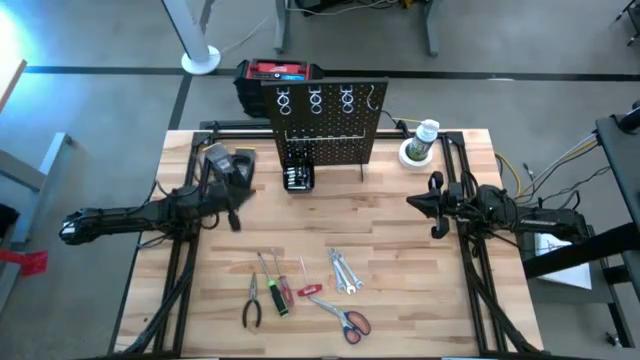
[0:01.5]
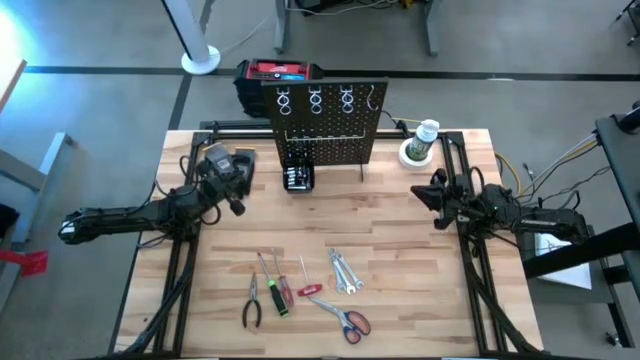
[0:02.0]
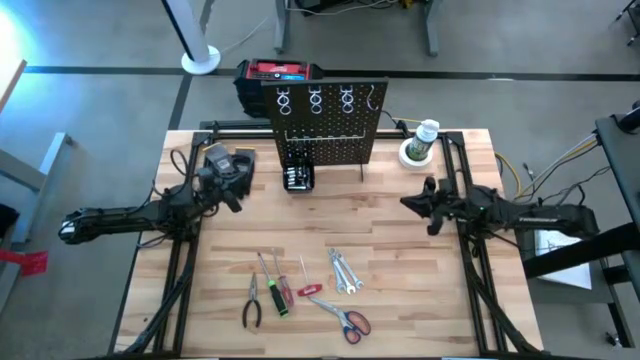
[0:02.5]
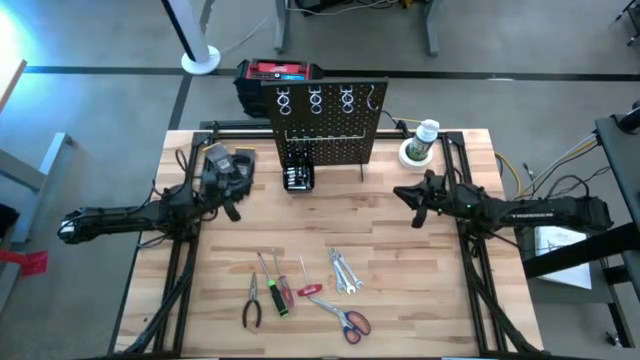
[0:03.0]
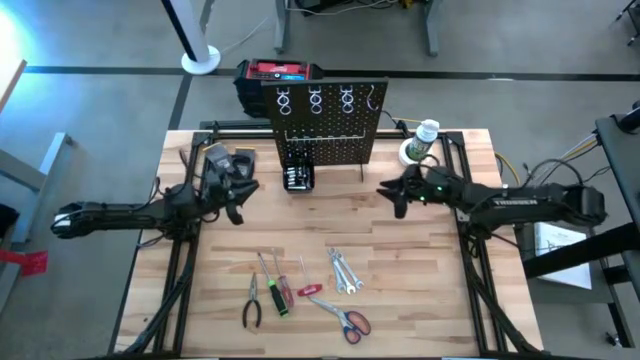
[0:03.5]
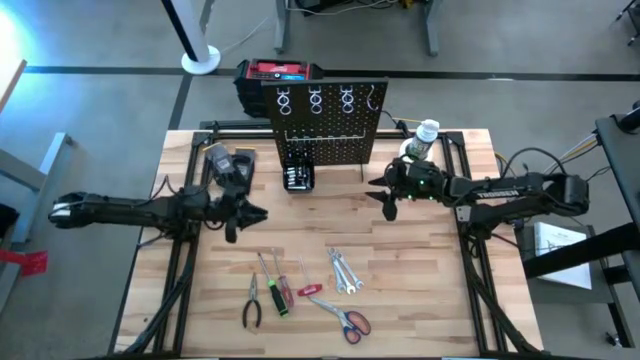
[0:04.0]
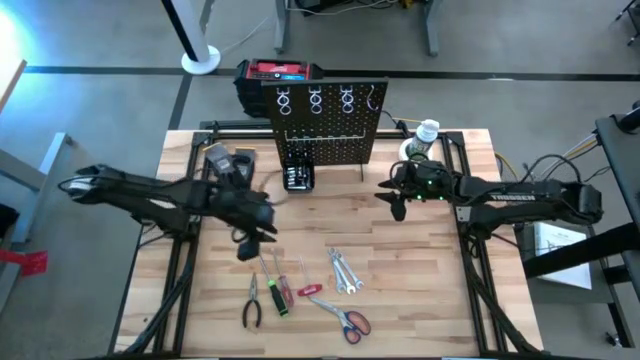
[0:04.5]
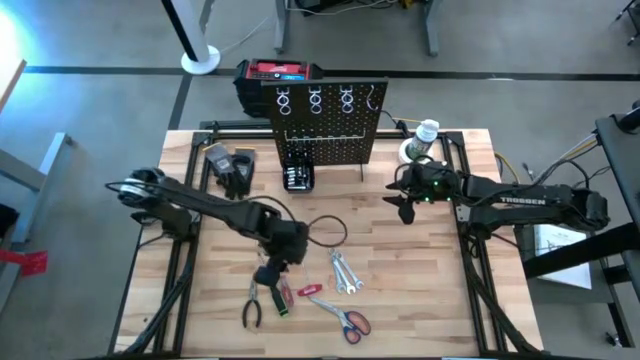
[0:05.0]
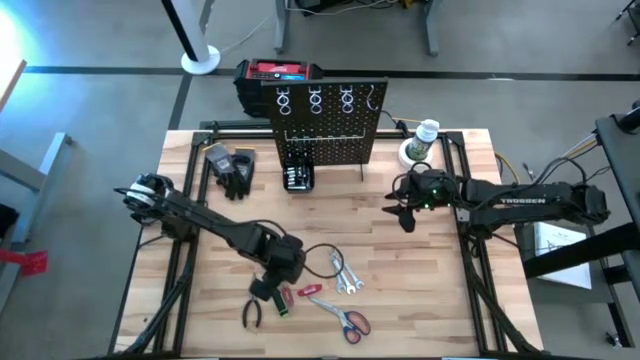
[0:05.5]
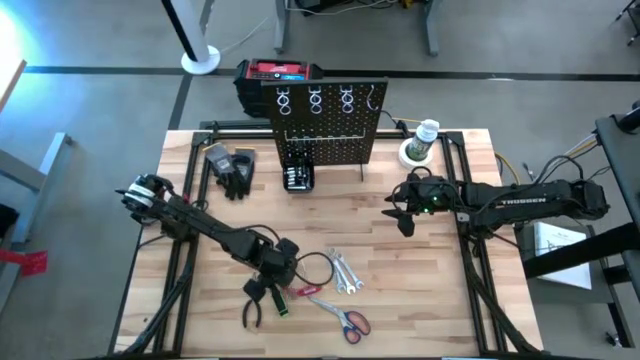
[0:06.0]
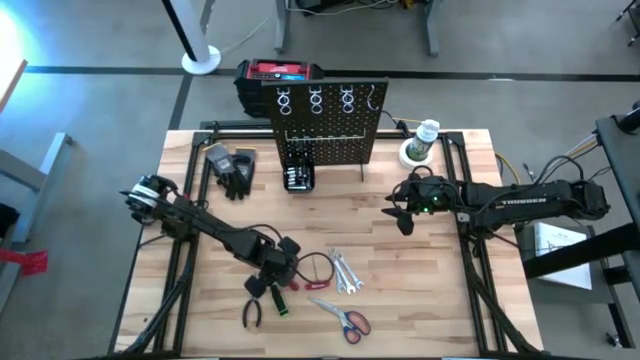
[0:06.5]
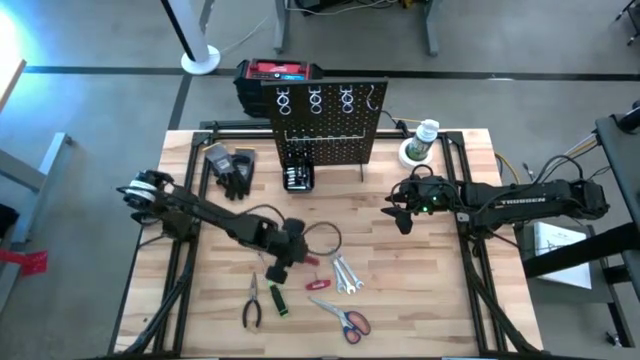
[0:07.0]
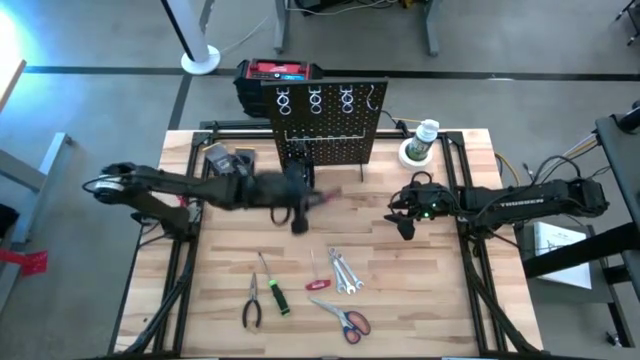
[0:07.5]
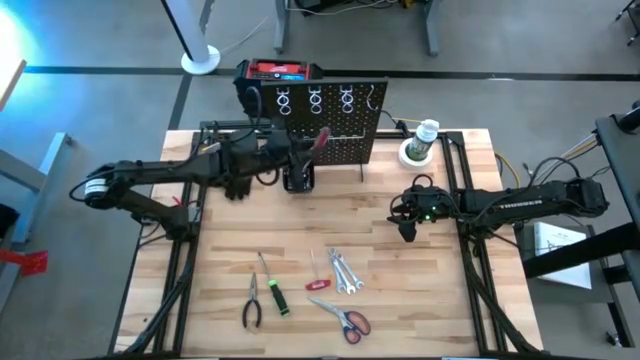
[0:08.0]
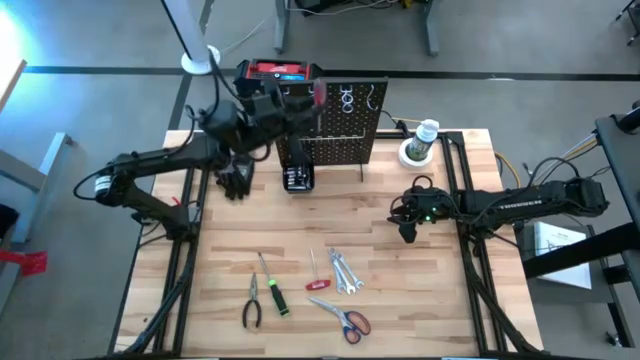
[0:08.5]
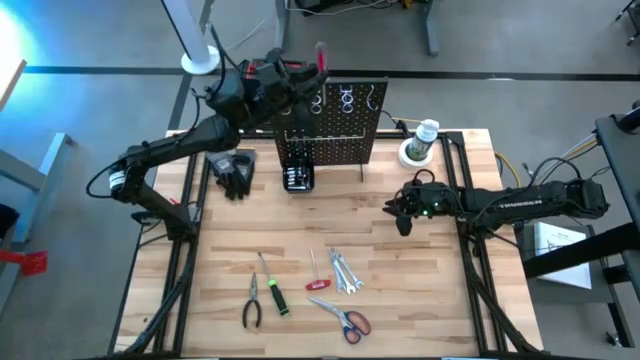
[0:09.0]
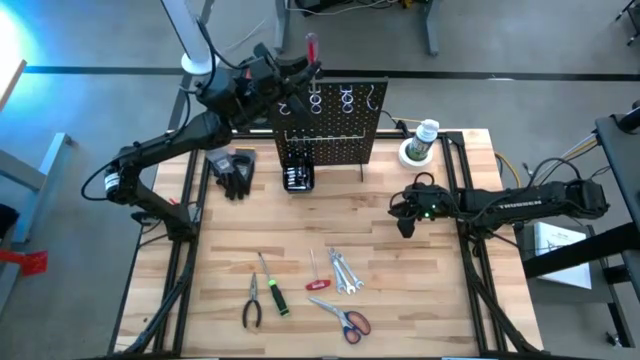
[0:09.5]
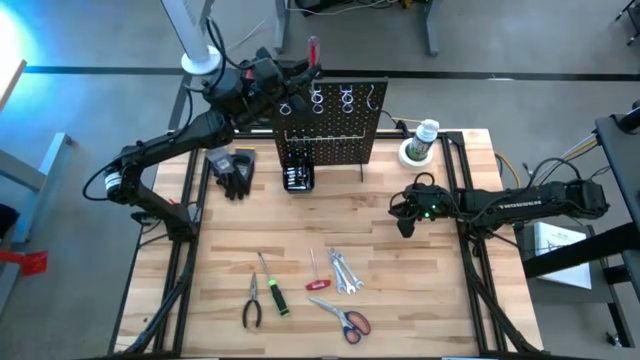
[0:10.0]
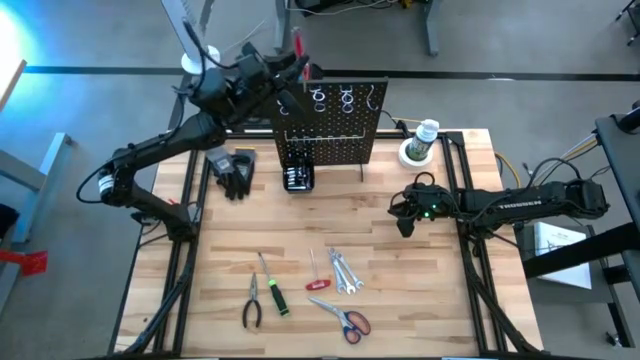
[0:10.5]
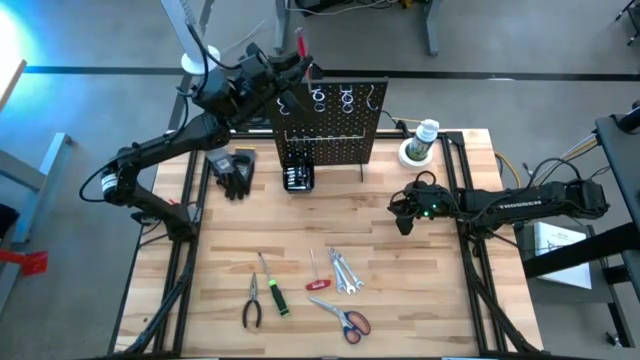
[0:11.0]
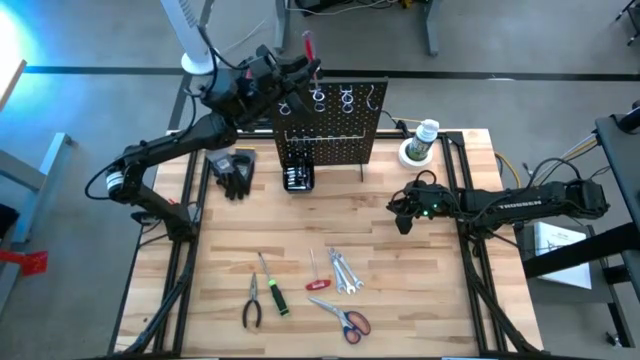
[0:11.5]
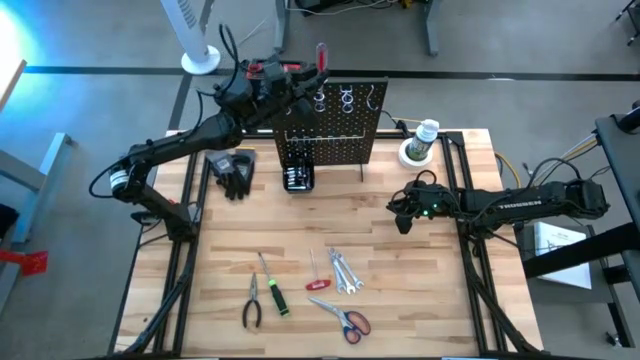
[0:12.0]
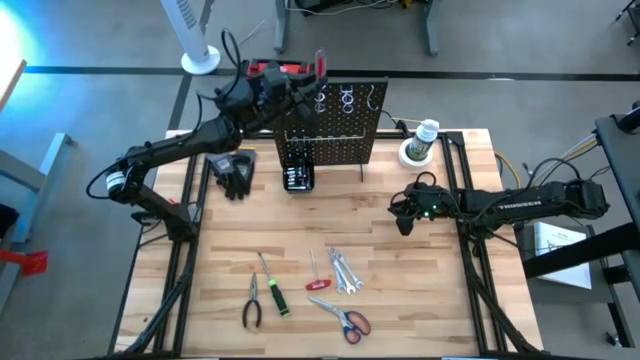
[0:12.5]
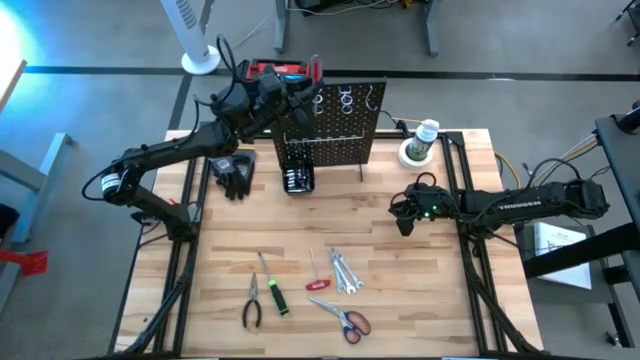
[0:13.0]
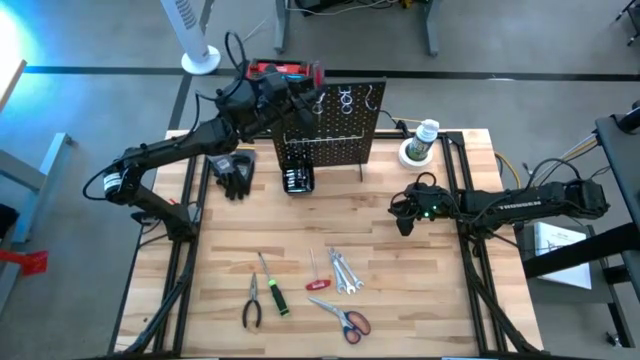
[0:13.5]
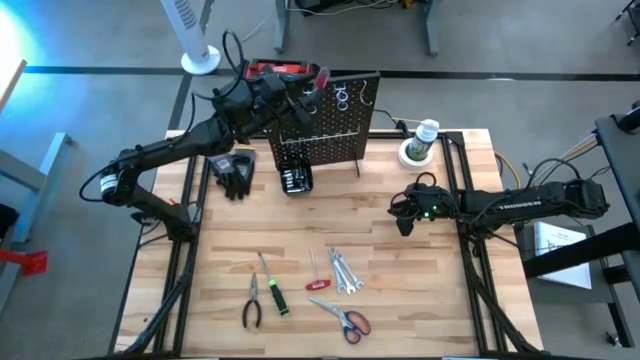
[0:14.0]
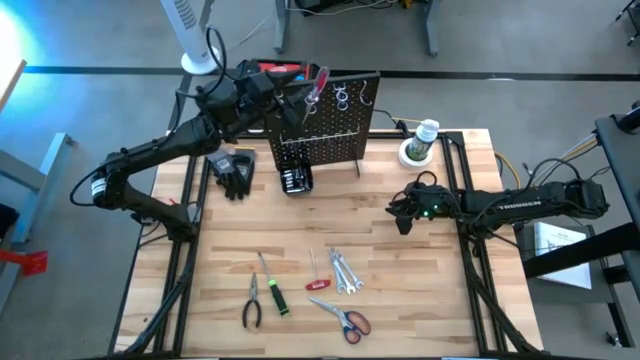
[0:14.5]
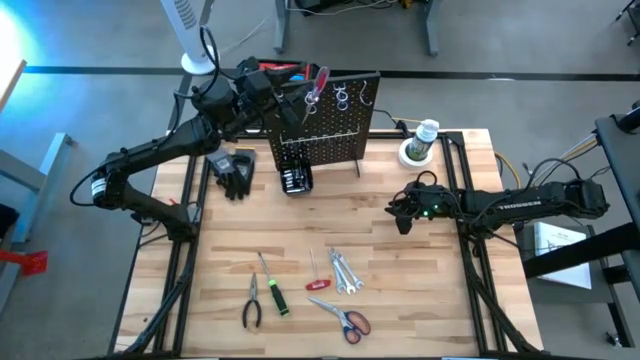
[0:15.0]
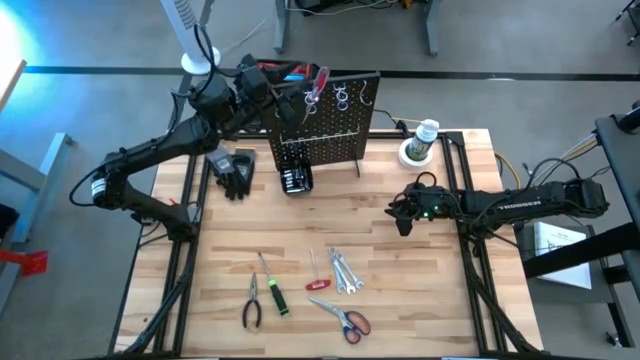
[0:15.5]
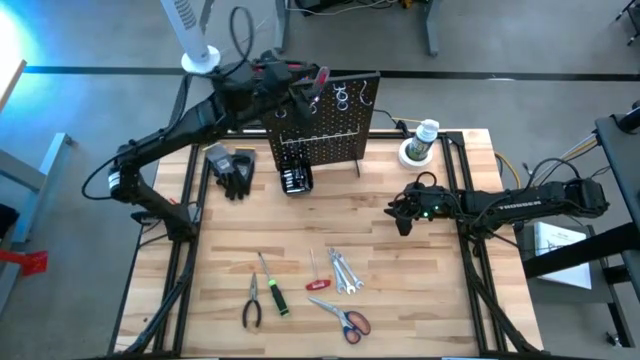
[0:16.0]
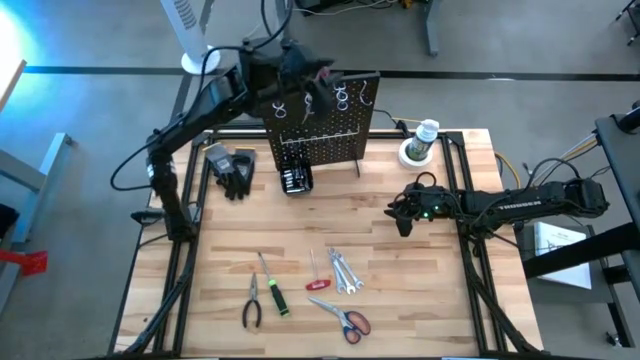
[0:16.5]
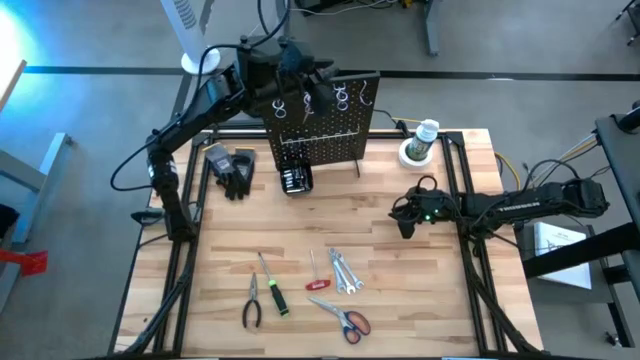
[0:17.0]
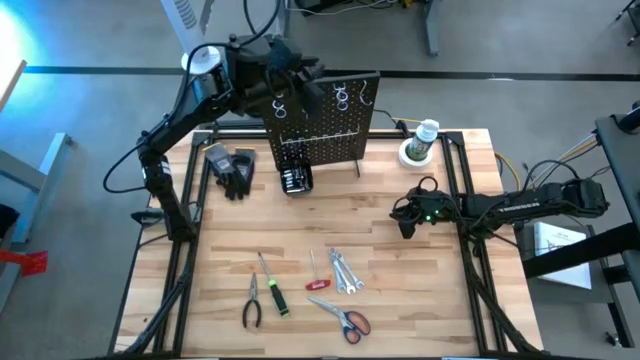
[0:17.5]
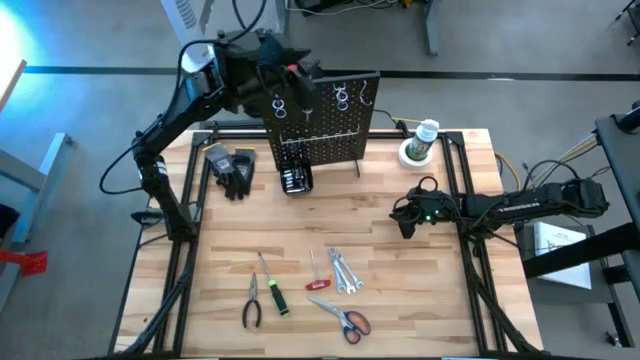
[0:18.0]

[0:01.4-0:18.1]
Task: Hang tools onto peg board
Hang the red screwdriver on the pegboard
